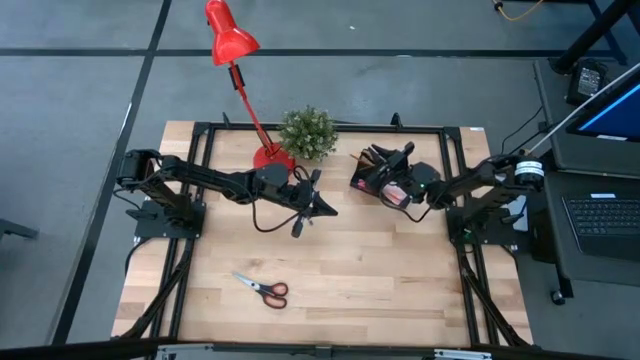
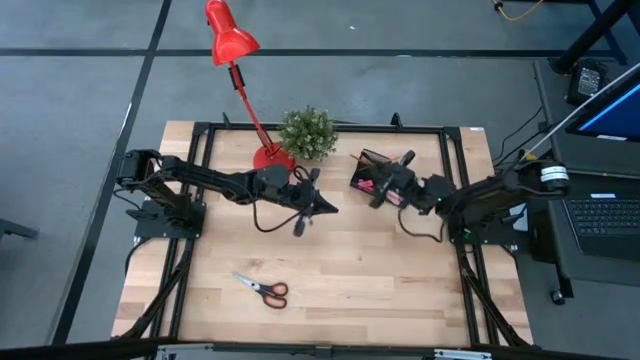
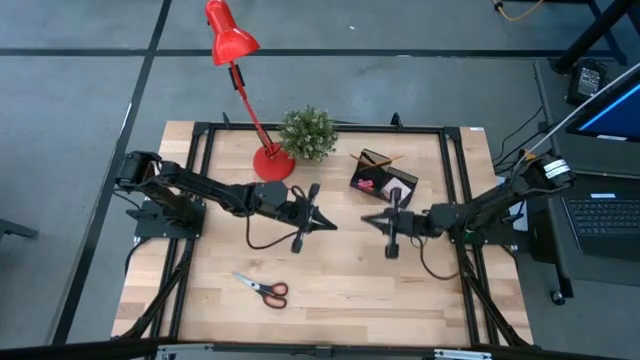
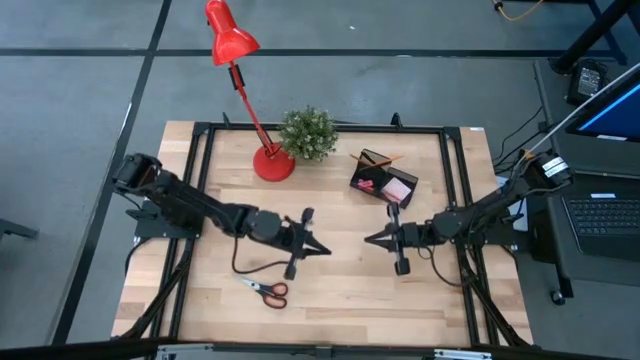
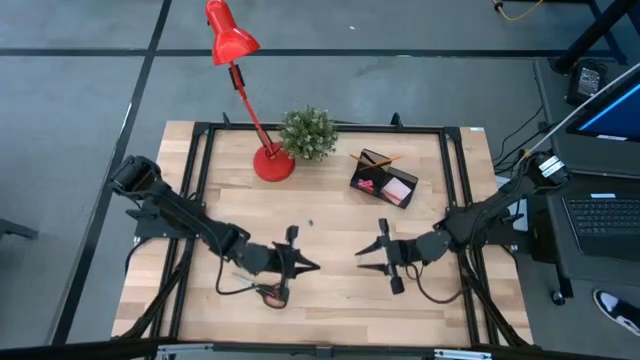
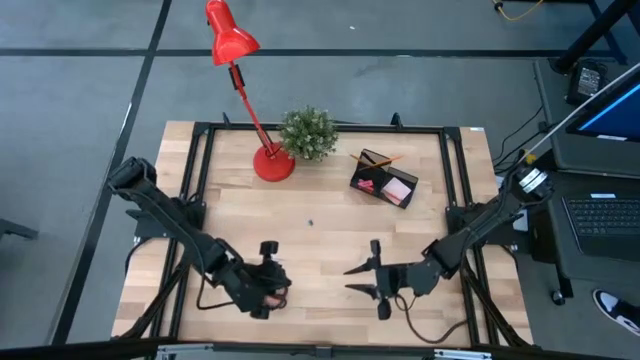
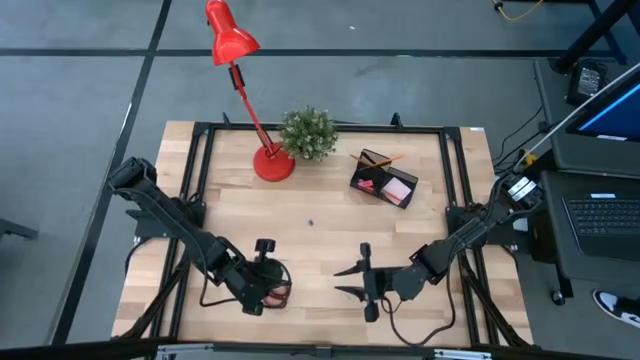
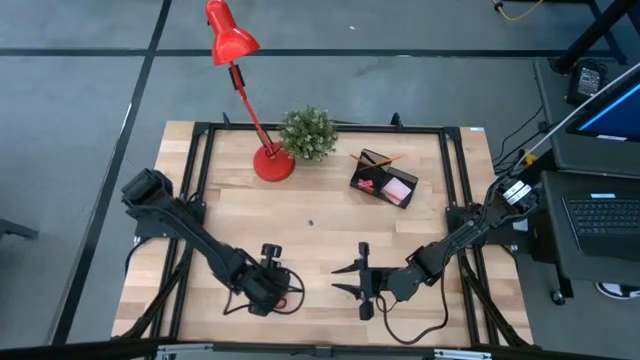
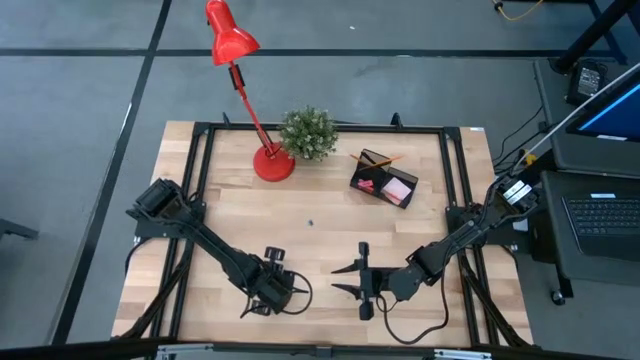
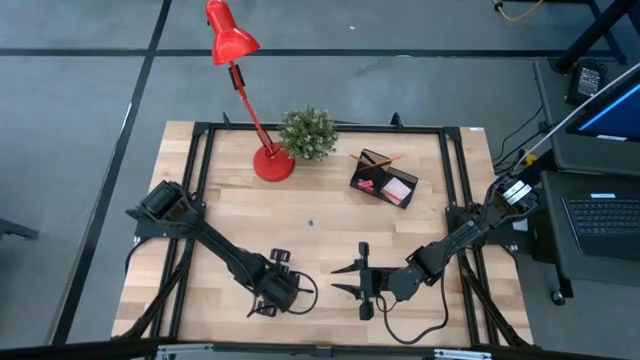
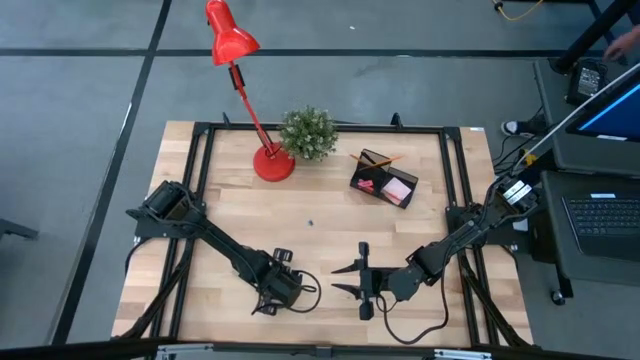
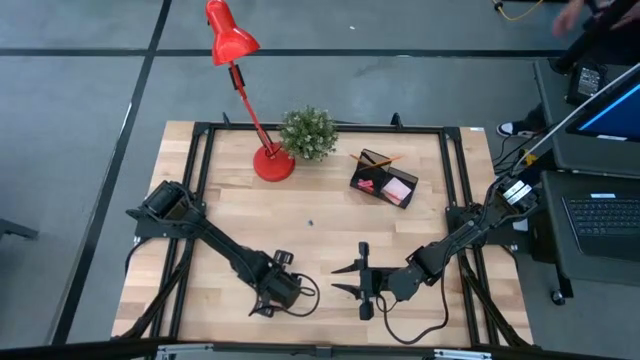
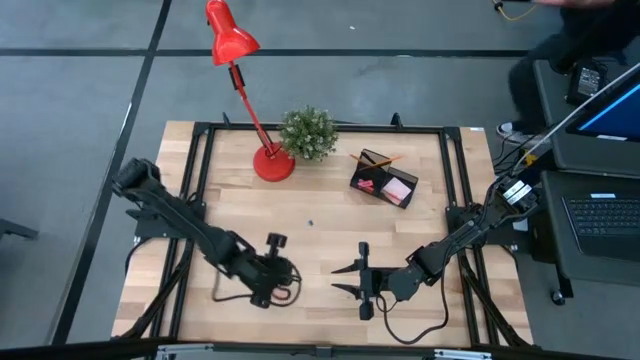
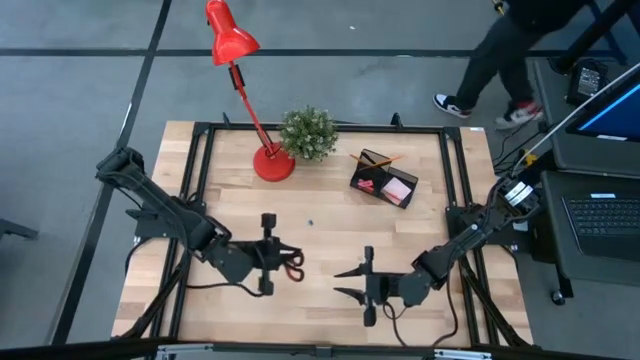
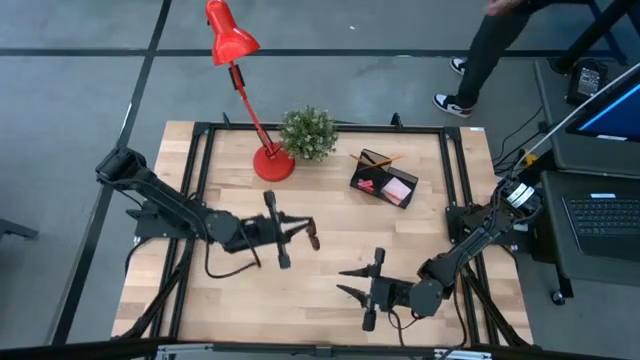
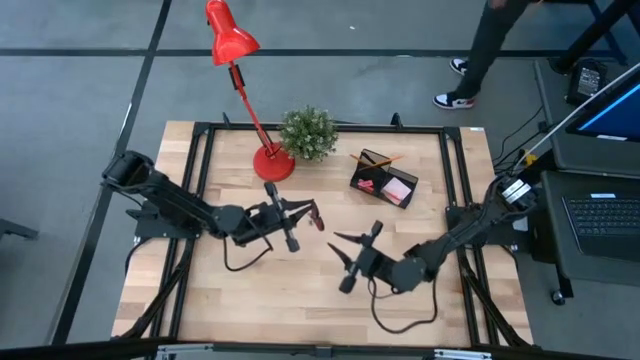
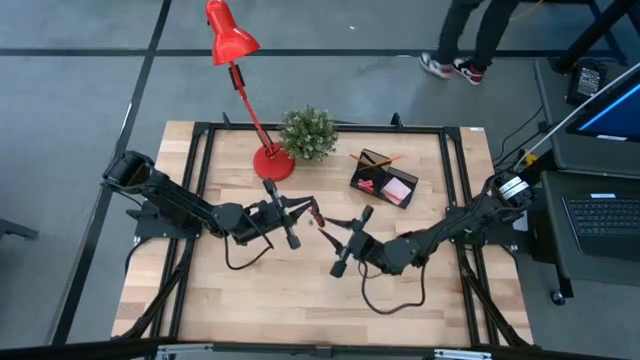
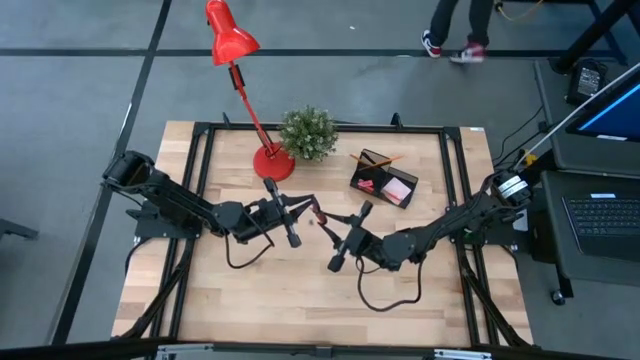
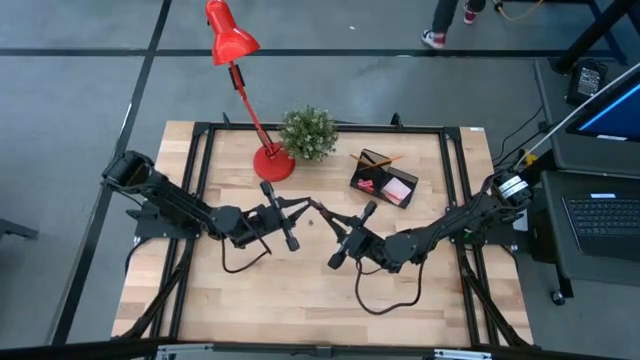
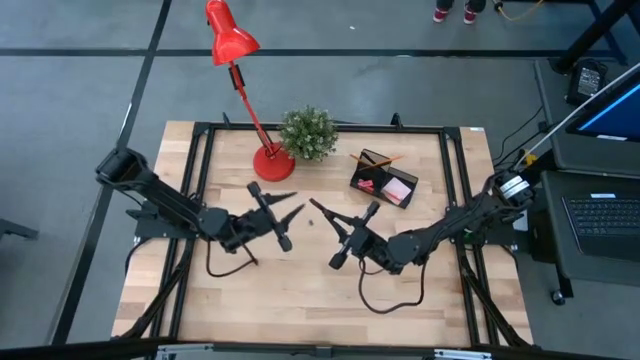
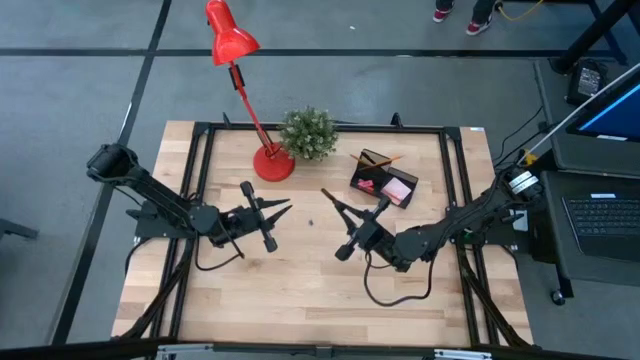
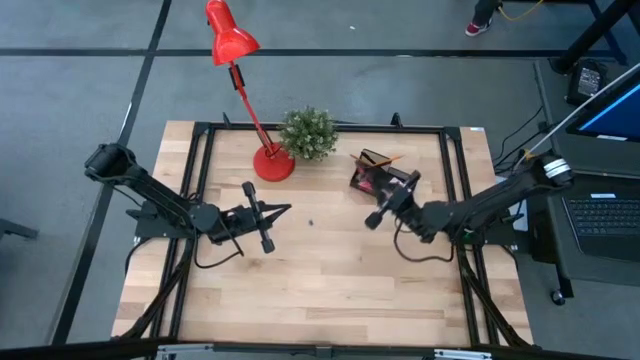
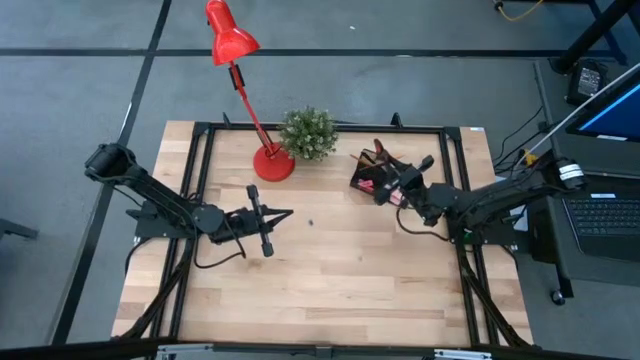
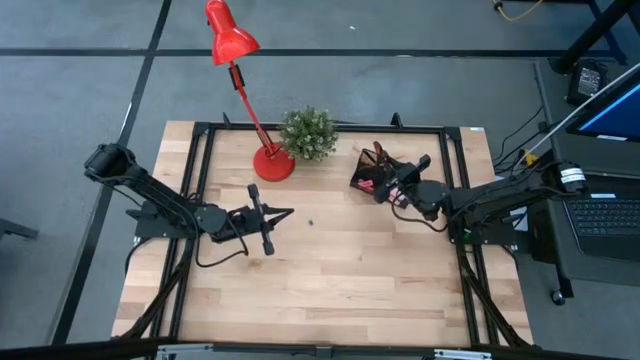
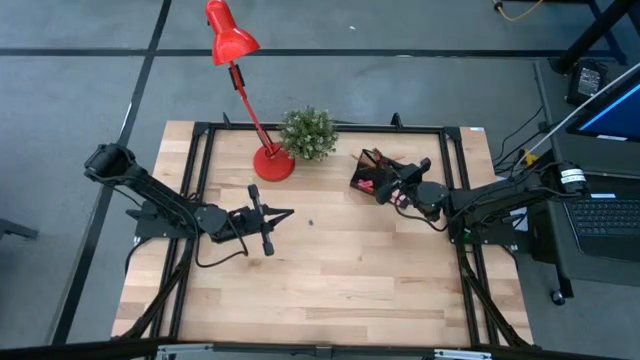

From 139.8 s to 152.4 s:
Task: Pick and place office supplies into organizer
Put the black scissors into the black desk organizer

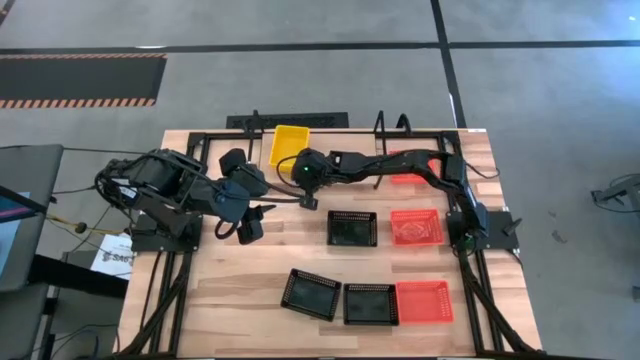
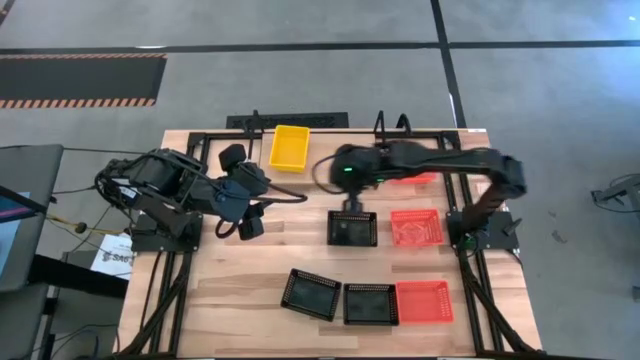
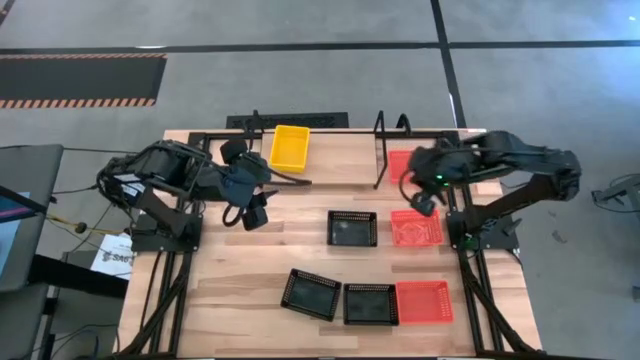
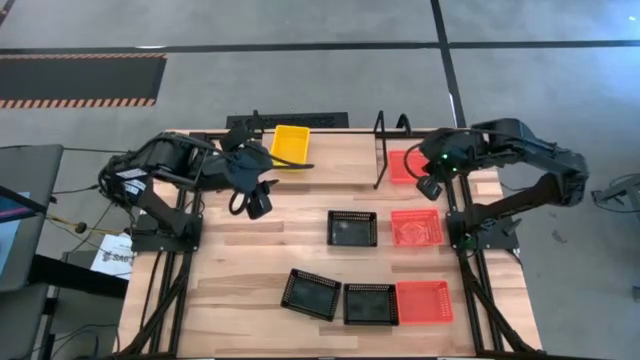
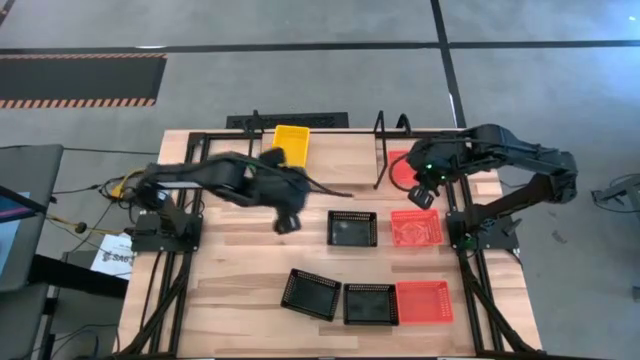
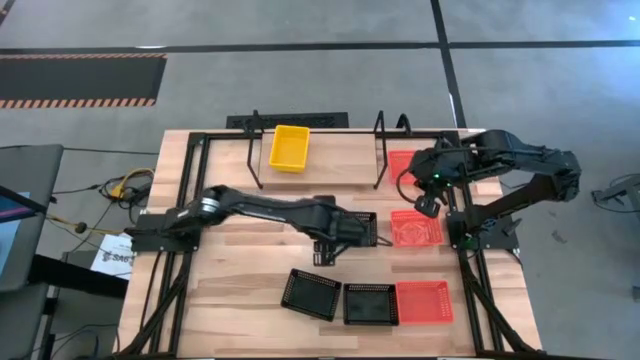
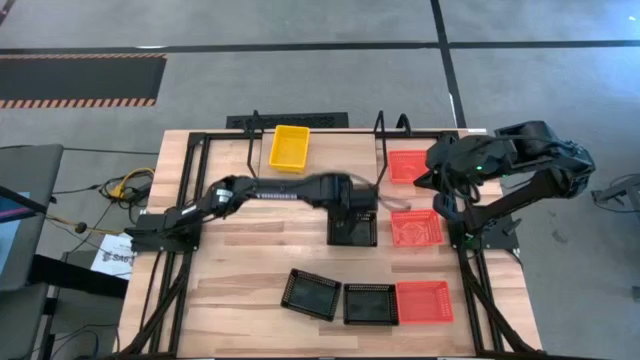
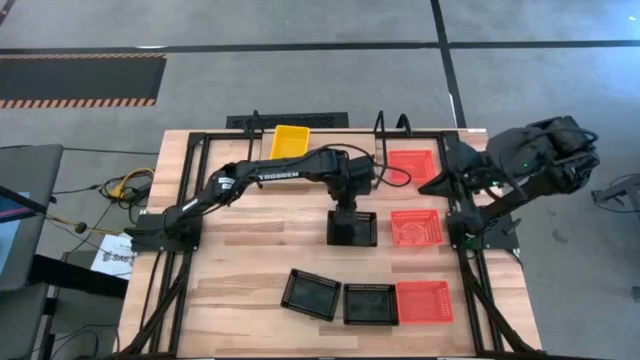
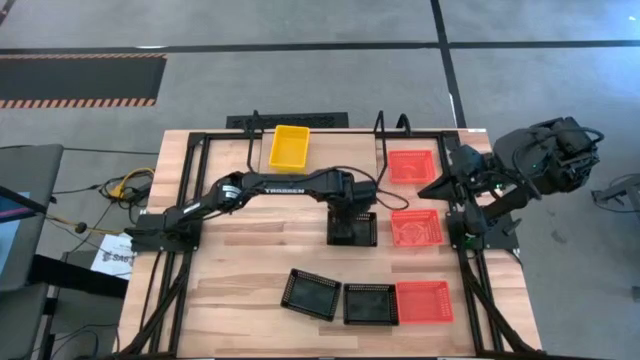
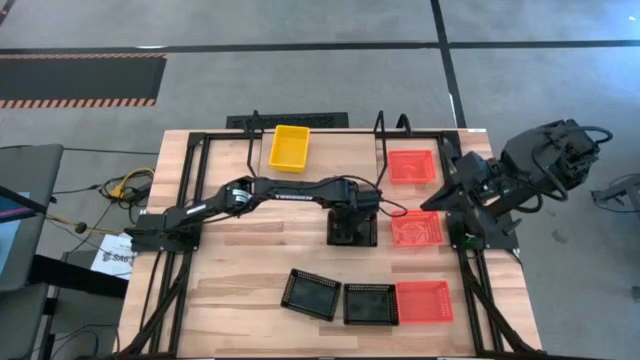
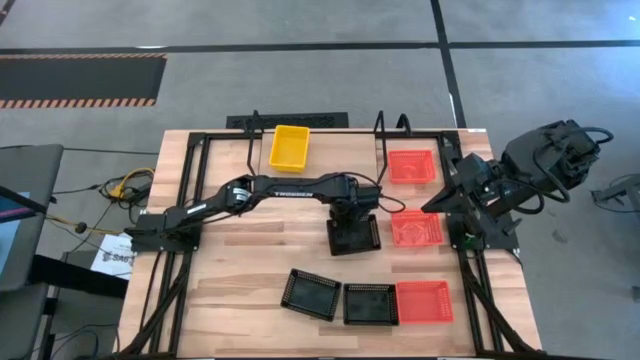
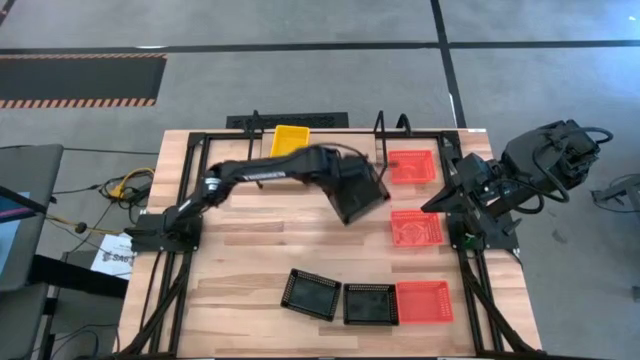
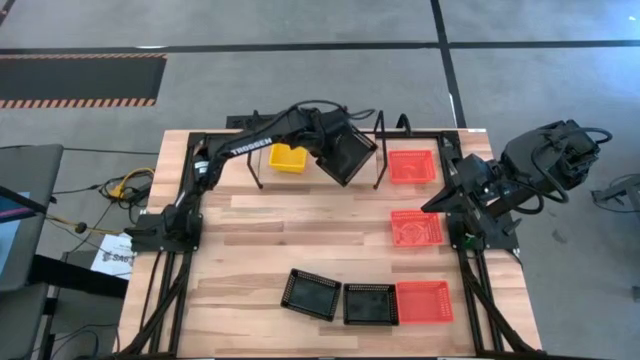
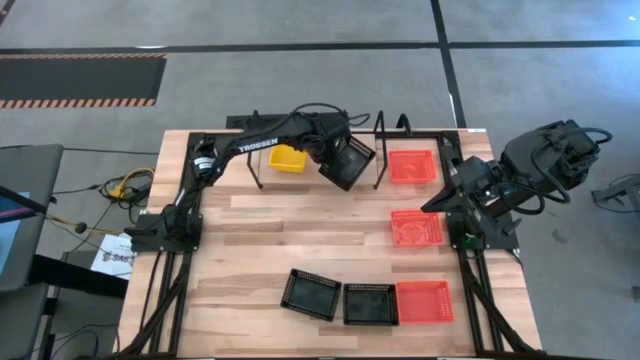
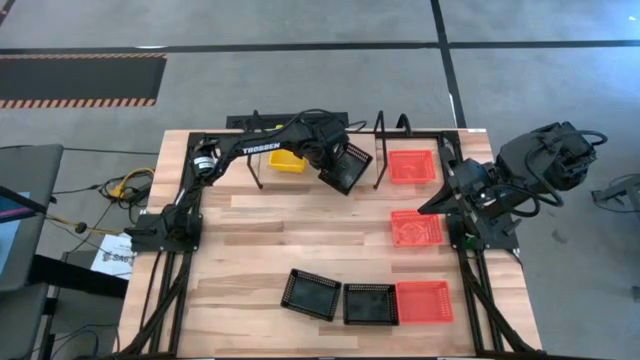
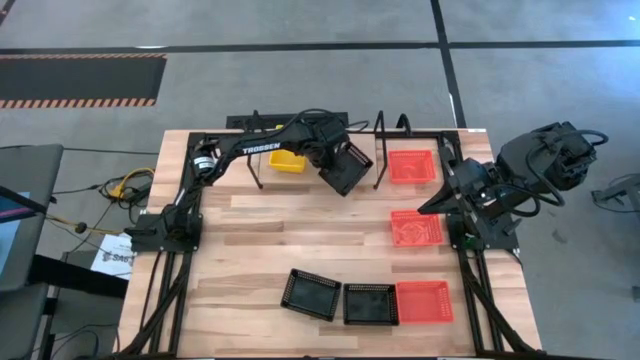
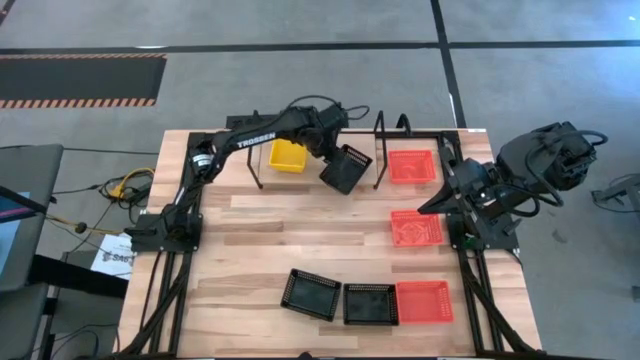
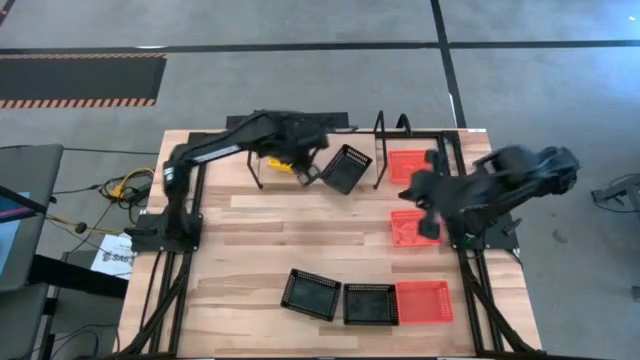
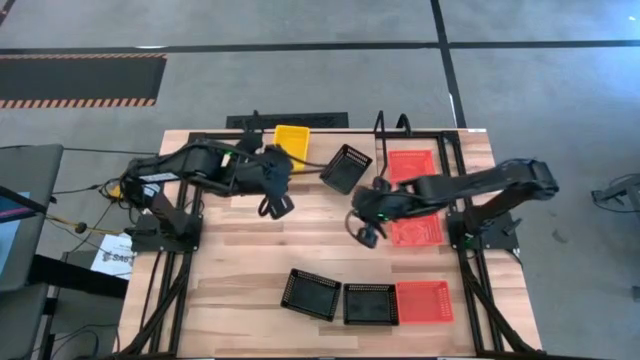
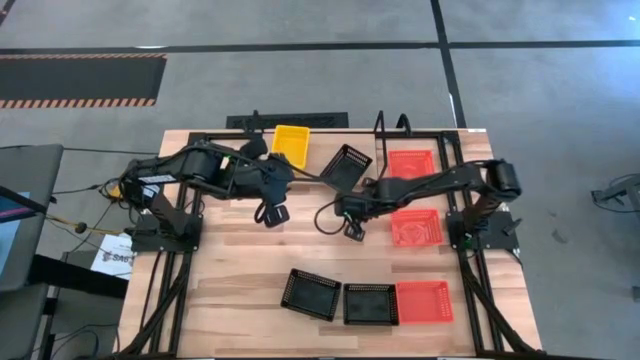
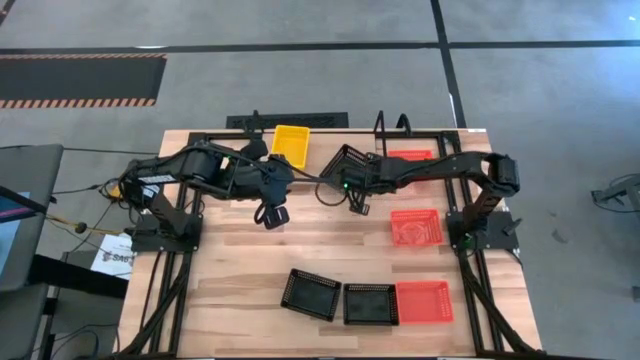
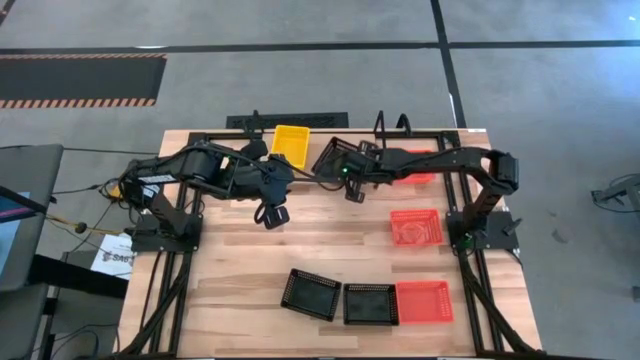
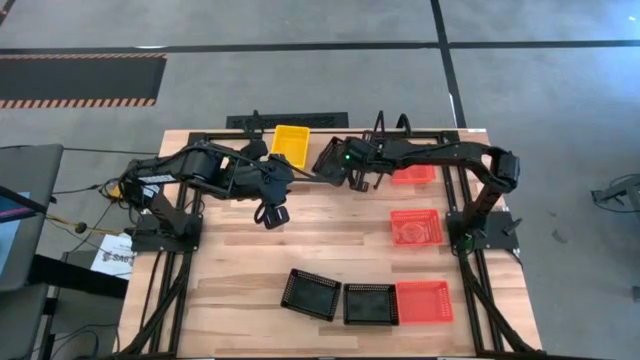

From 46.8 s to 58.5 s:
Task: Stack baskets on shelf by color
Put the top black bin on the shelf
